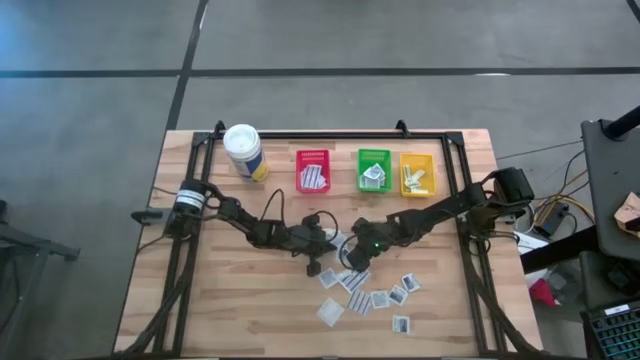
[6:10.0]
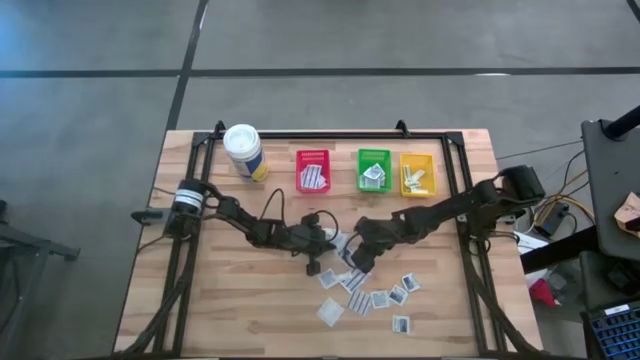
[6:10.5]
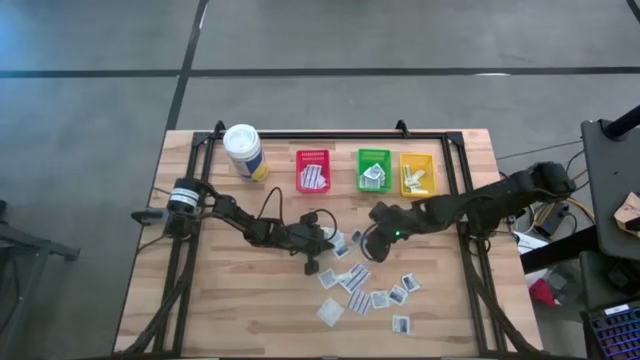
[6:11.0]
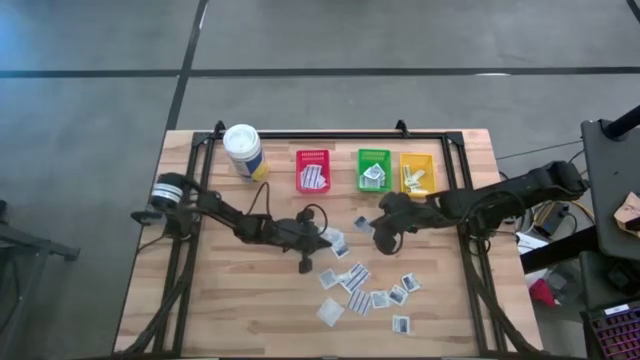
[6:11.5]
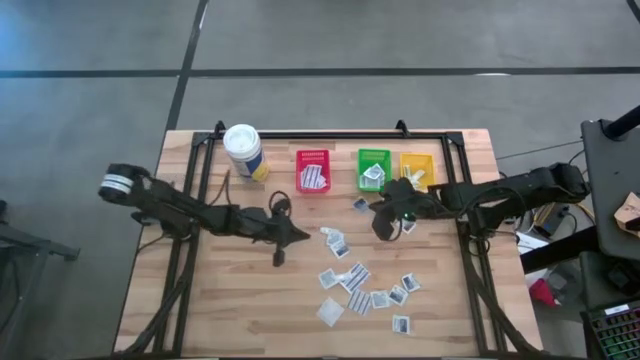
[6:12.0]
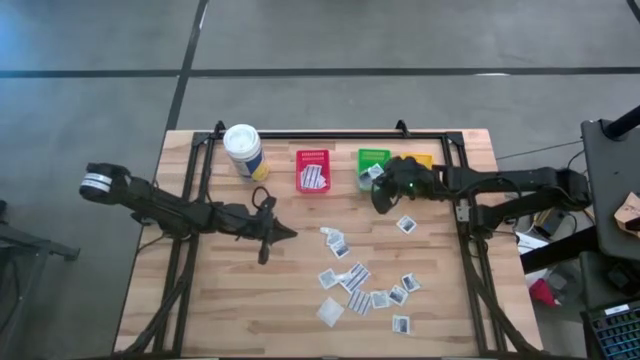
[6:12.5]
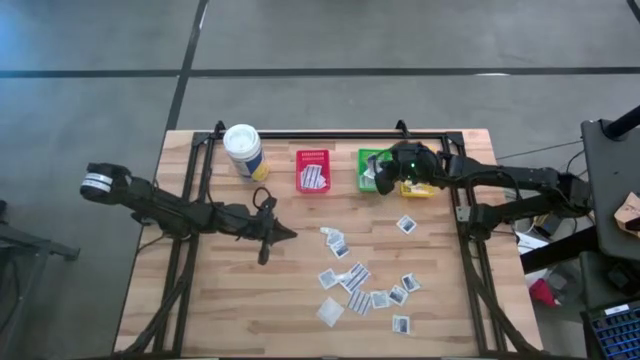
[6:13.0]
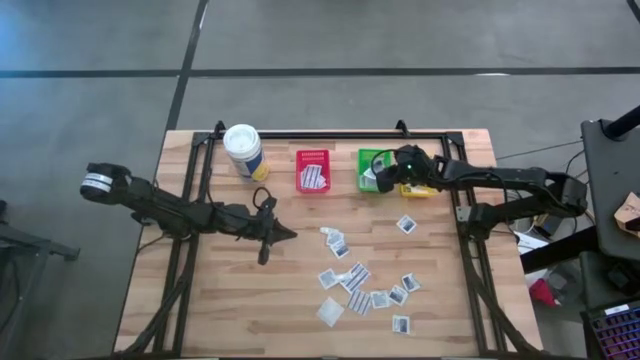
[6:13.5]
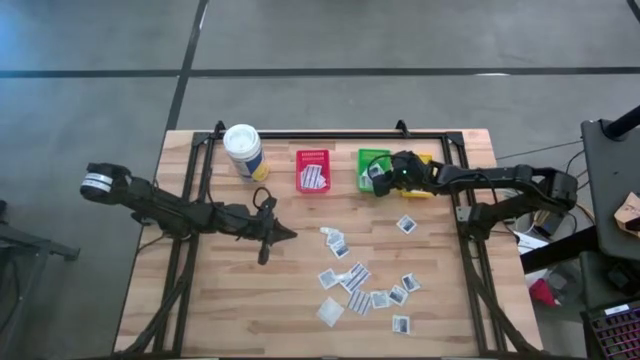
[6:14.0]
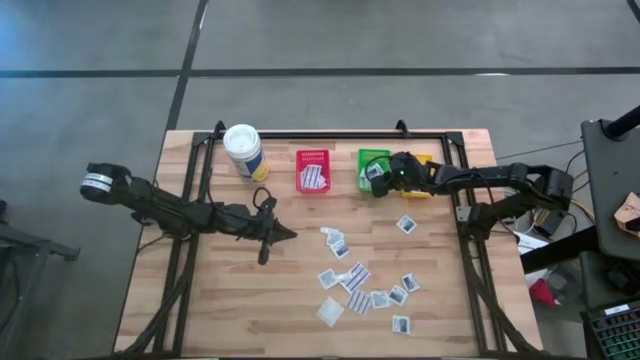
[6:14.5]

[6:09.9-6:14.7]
Task: Pick & Place First Aid Supplies
Put the alcohol pad in the green bin

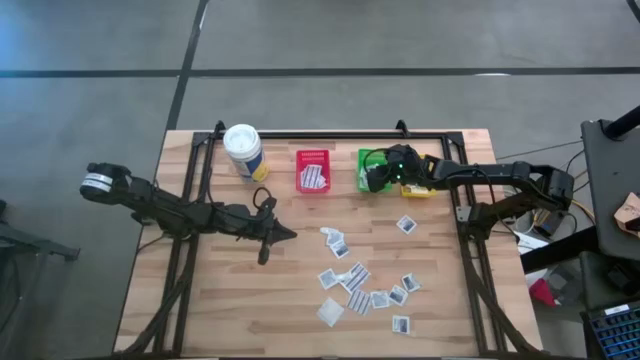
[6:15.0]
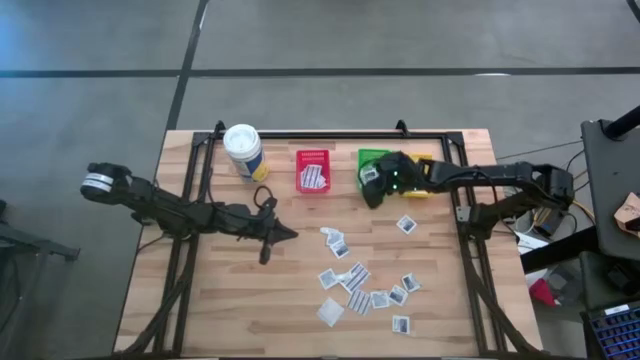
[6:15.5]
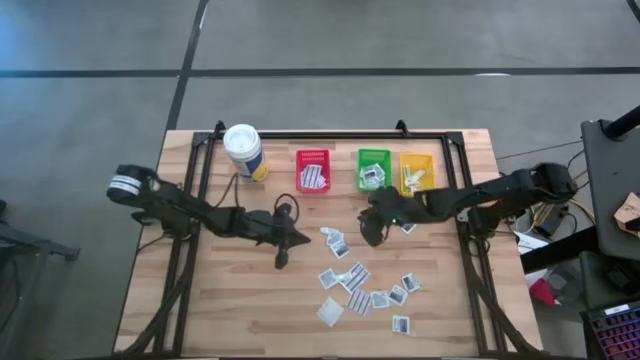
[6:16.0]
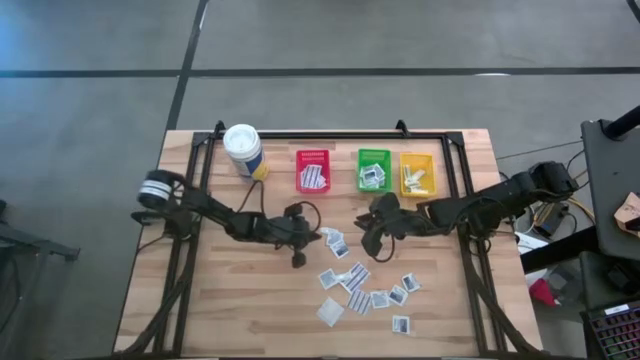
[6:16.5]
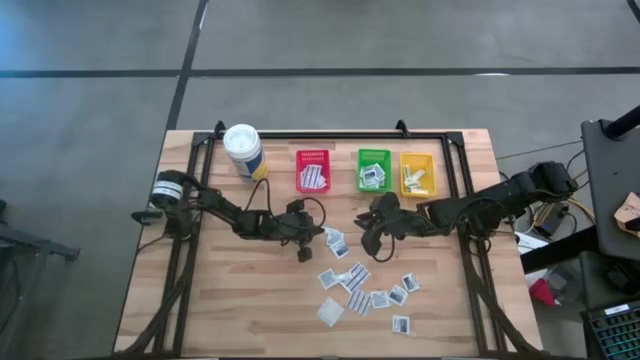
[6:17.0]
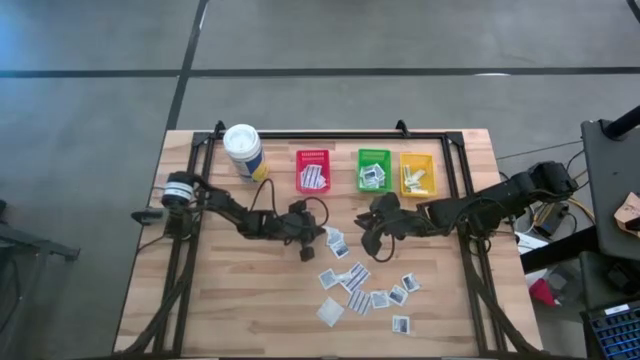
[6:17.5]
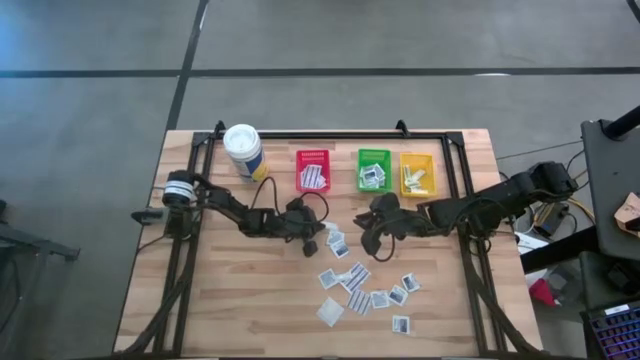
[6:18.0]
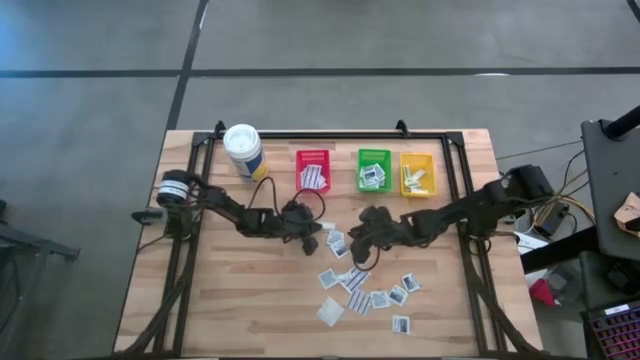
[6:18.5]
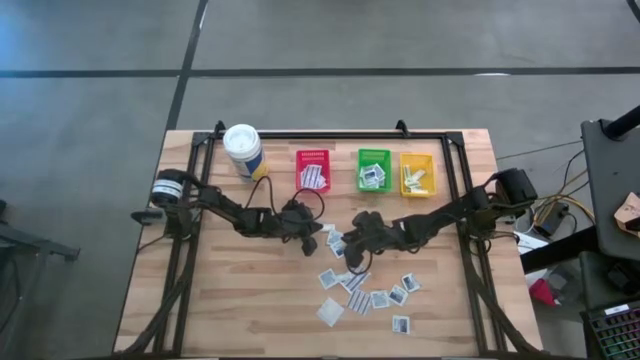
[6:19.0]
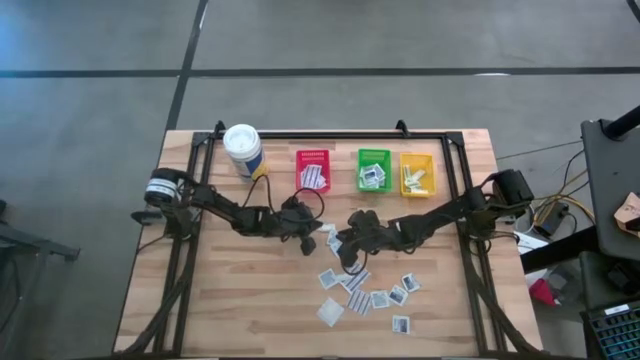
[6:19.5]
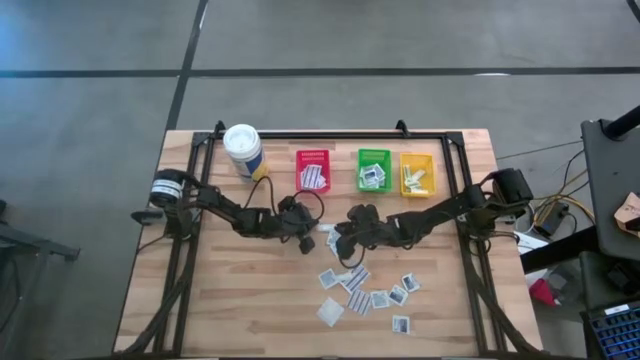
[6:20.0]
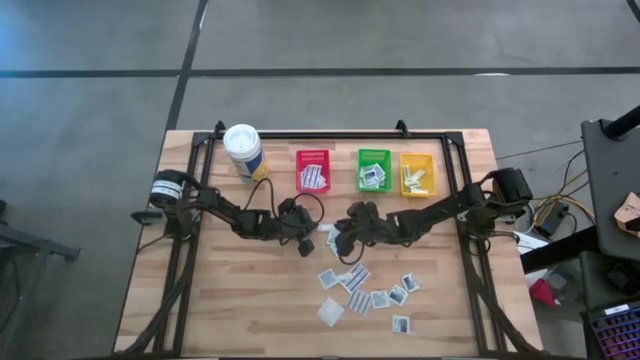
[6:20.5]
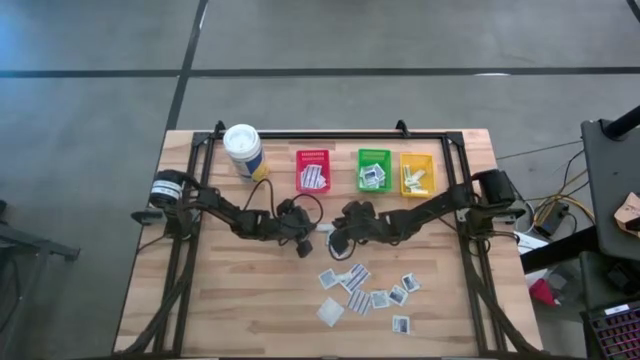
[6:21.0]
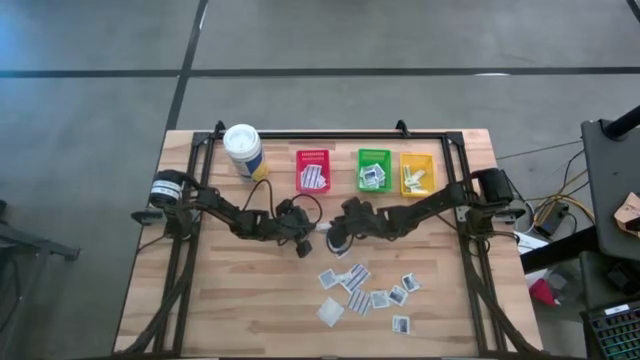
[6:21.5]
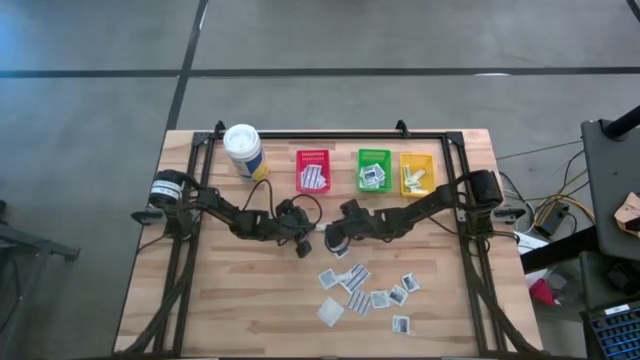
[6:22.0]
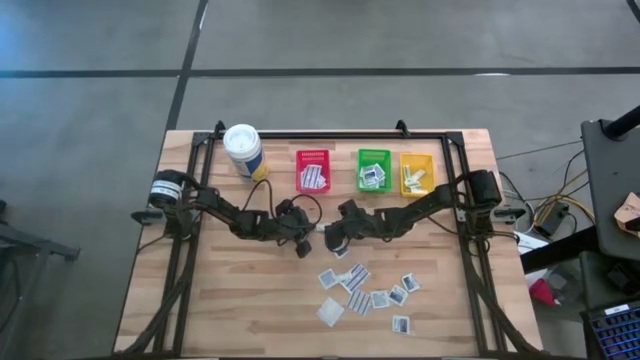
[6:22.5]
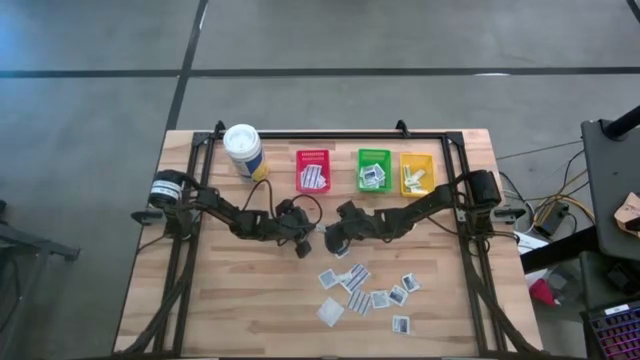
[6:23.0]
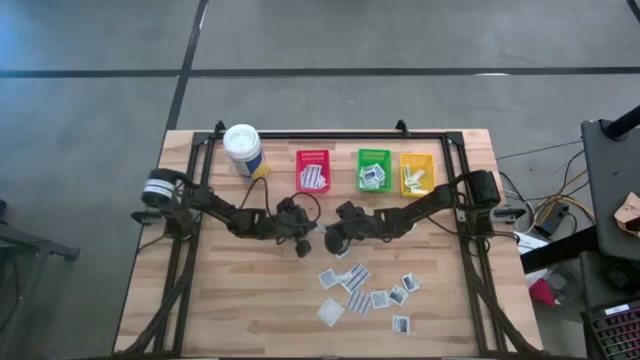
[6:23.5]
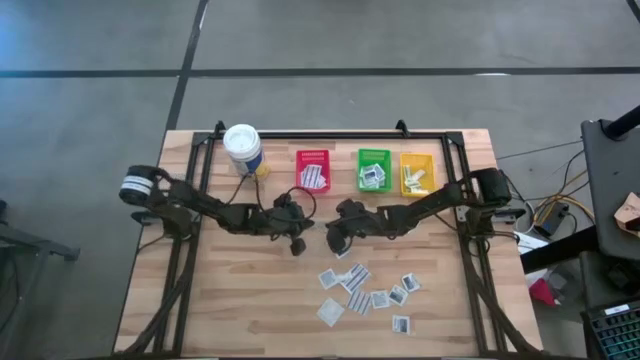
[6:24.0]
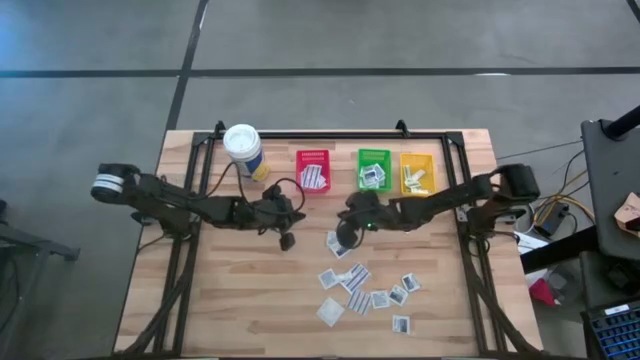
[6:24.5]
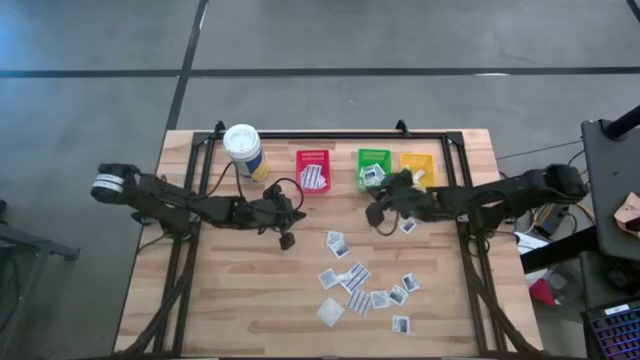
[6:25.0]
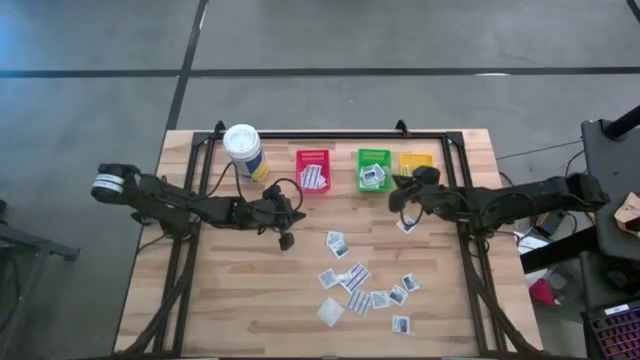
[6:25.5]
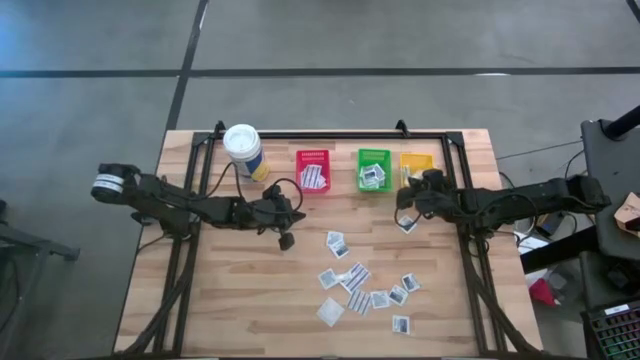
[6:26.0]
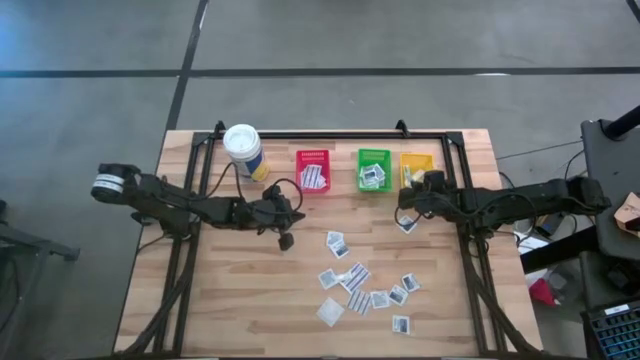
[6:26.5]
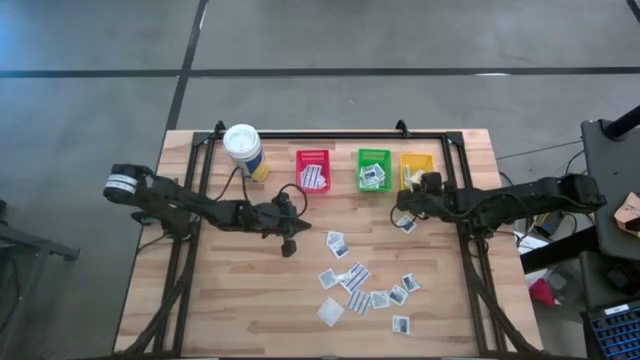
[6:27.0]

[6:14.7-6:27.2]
Put the green bandage in the yellow bin

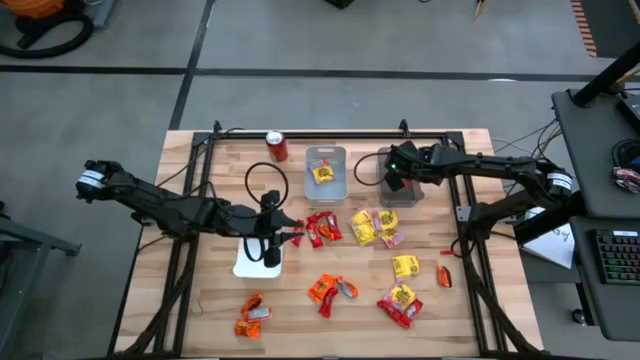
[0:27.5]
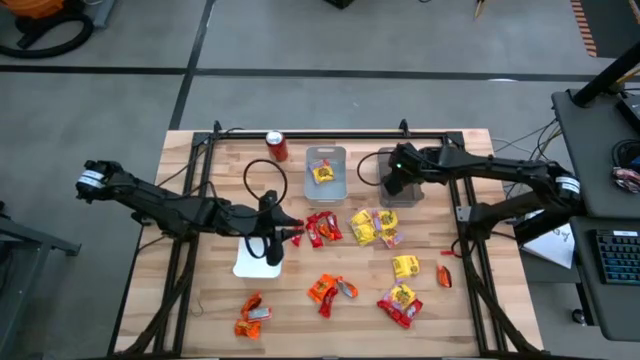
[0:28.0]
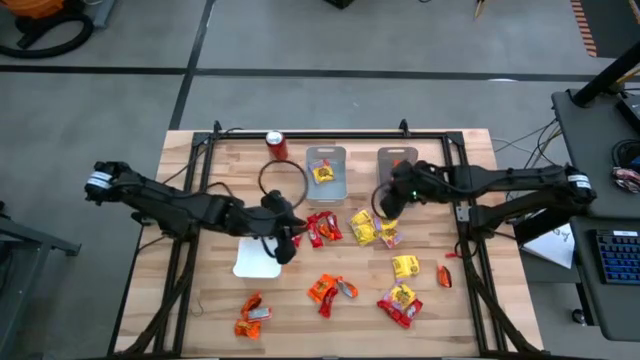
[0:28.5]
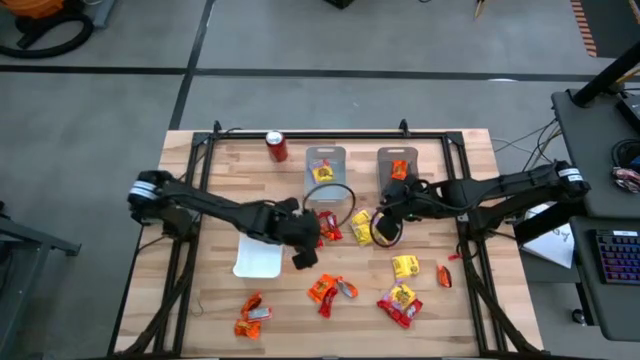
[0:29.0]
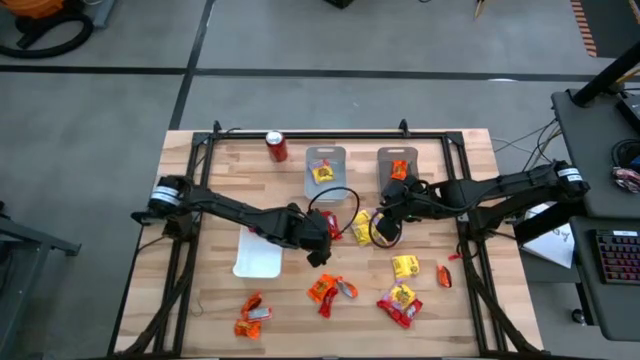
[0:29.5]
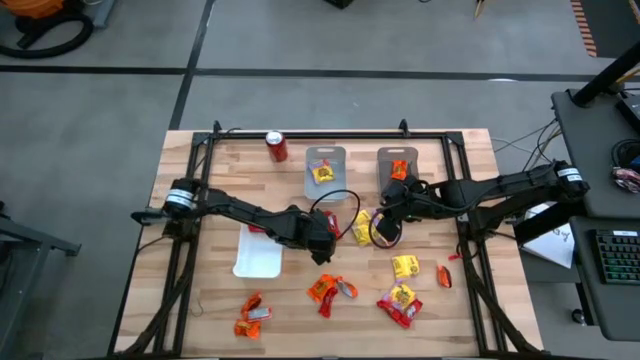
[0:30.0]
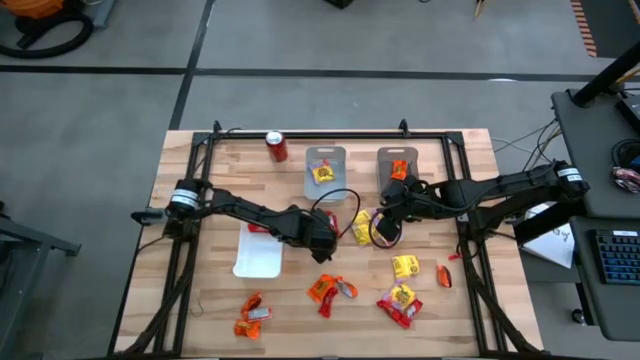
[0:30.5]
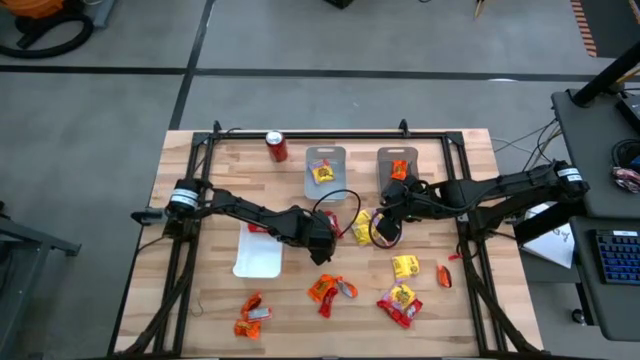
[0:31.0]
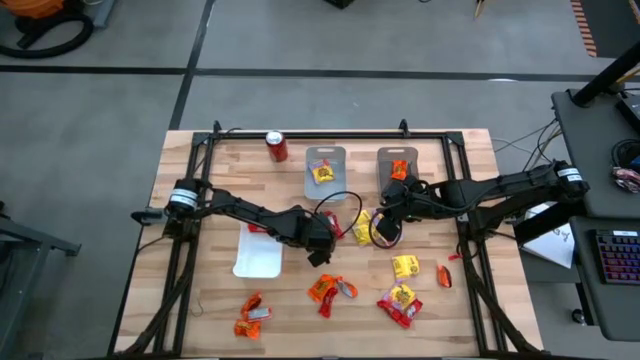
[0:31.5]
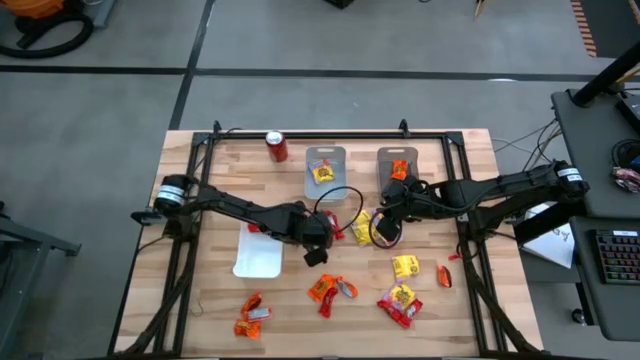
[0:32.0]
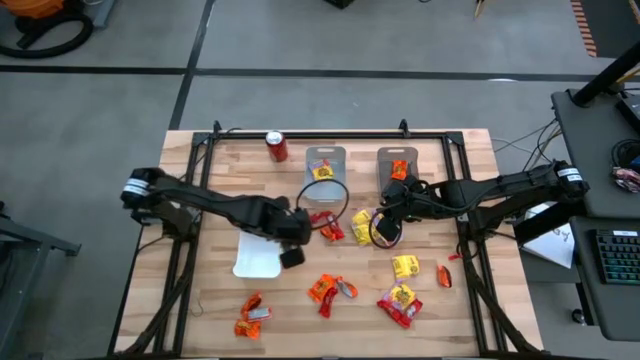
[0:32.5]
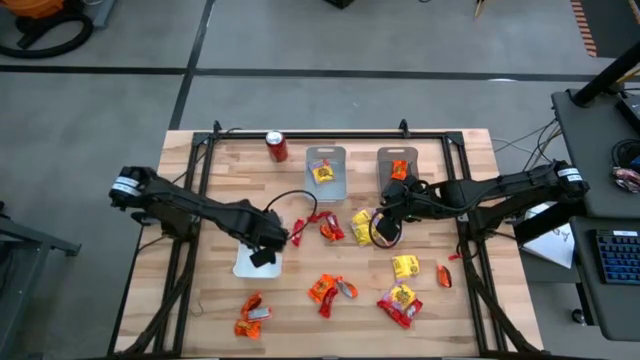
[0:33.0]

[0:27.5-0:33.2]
Task: Sort candy
Put the red candy into the white bin
